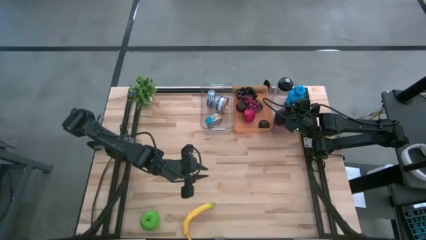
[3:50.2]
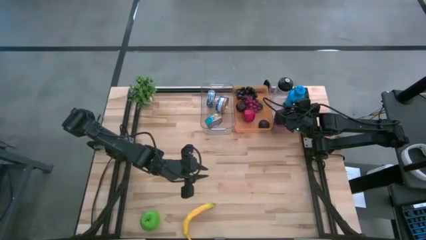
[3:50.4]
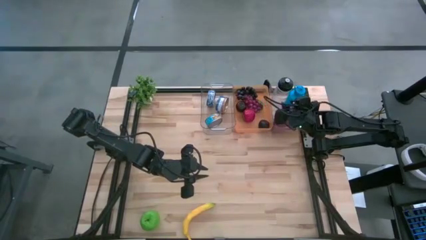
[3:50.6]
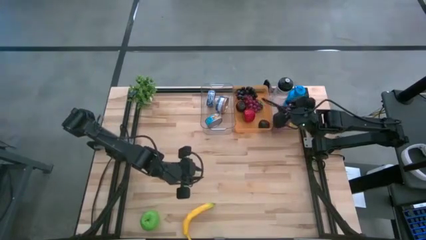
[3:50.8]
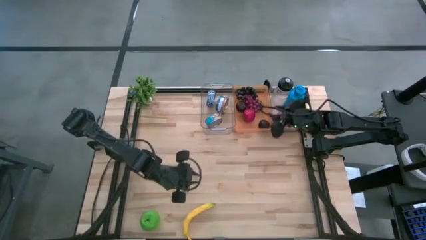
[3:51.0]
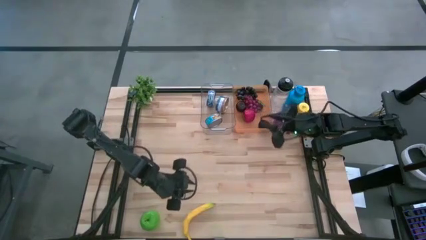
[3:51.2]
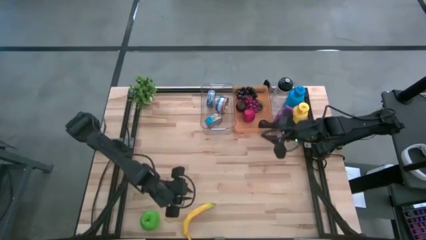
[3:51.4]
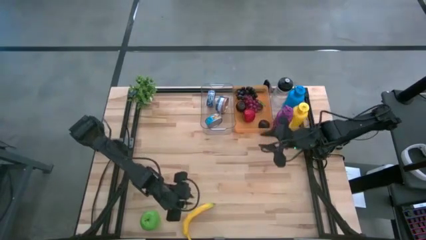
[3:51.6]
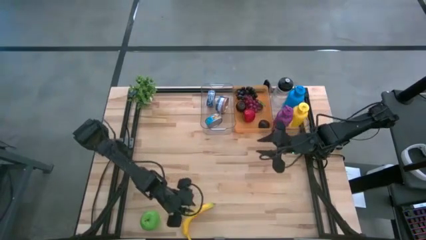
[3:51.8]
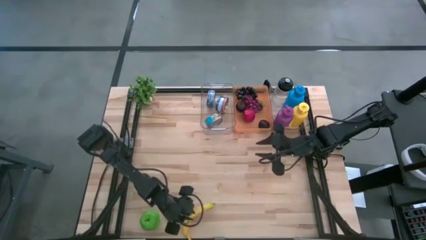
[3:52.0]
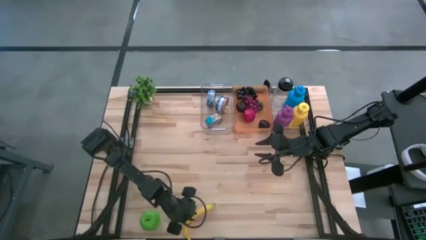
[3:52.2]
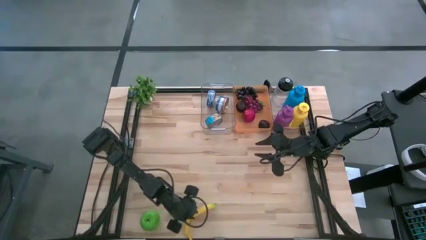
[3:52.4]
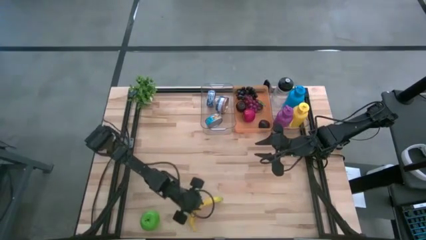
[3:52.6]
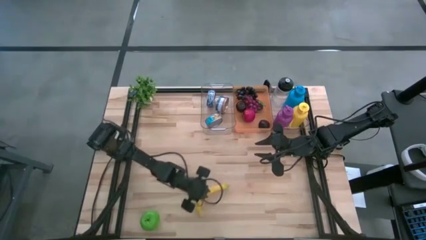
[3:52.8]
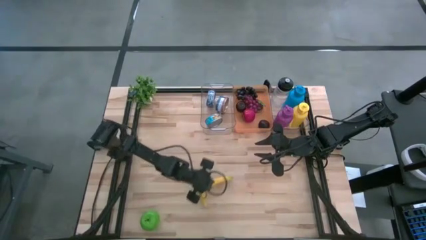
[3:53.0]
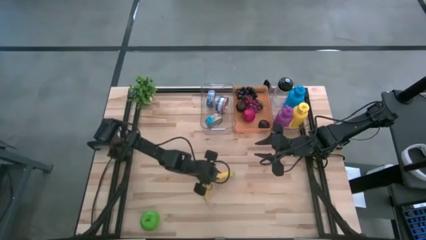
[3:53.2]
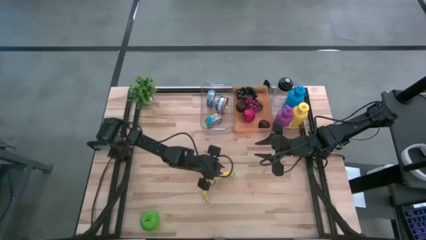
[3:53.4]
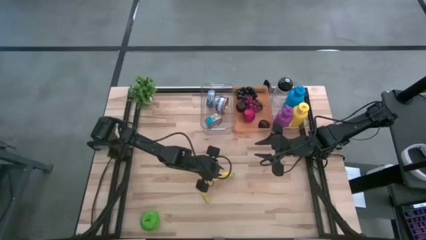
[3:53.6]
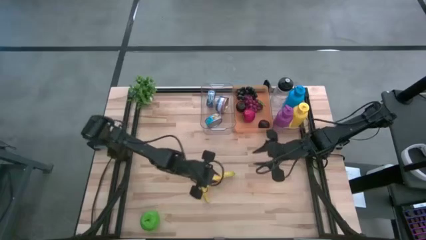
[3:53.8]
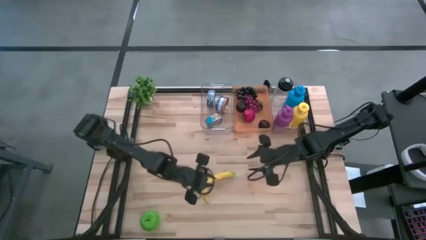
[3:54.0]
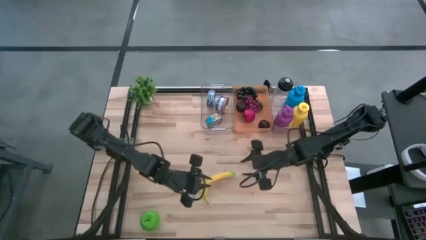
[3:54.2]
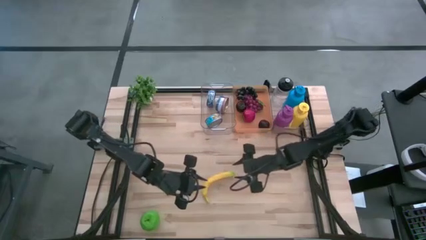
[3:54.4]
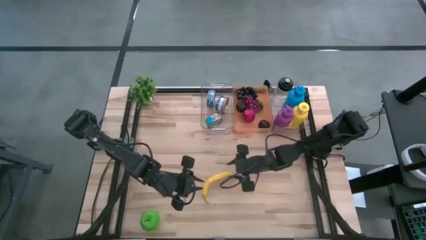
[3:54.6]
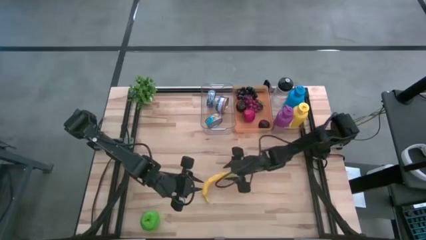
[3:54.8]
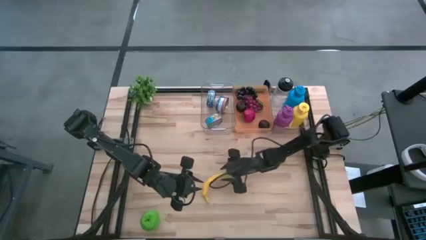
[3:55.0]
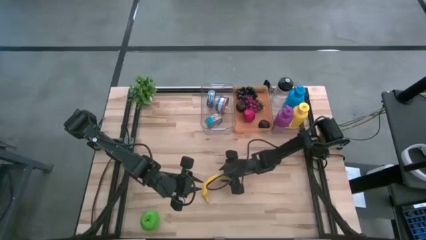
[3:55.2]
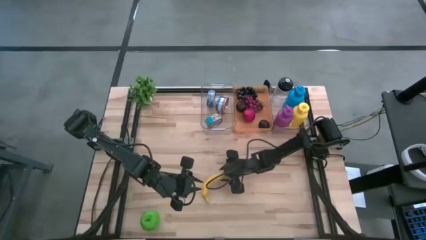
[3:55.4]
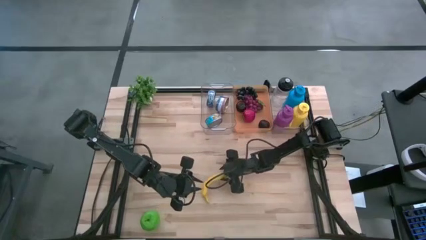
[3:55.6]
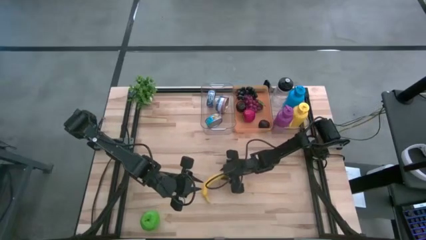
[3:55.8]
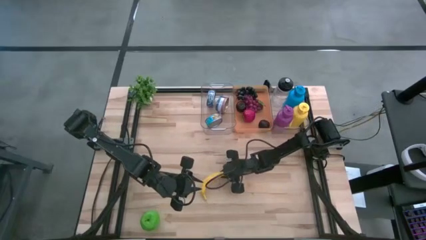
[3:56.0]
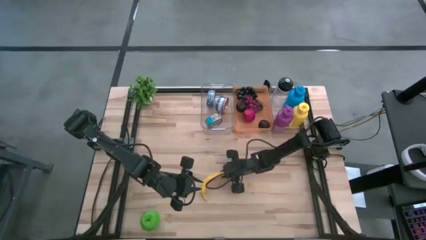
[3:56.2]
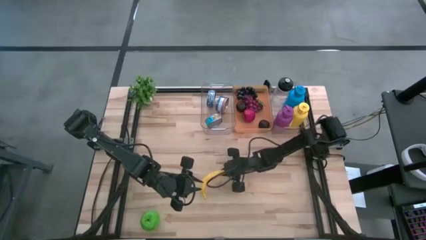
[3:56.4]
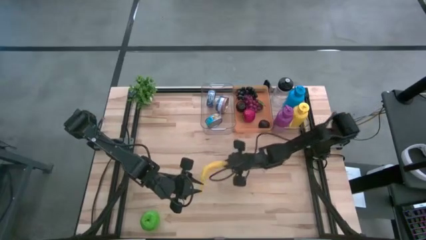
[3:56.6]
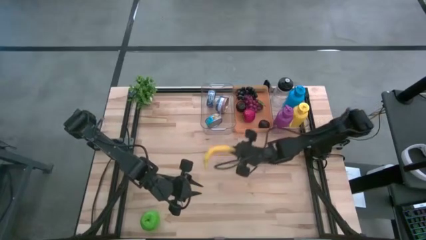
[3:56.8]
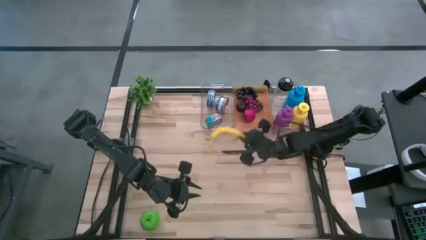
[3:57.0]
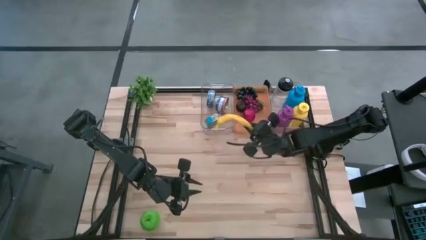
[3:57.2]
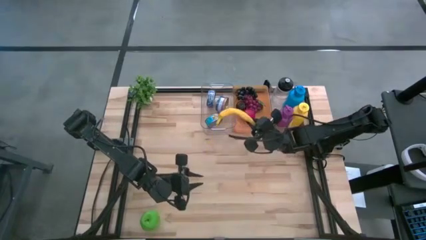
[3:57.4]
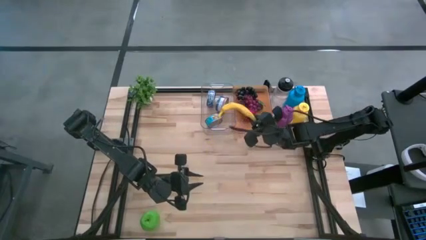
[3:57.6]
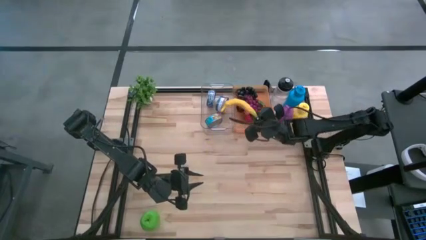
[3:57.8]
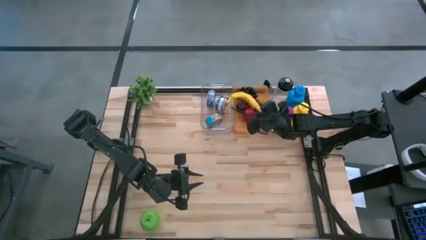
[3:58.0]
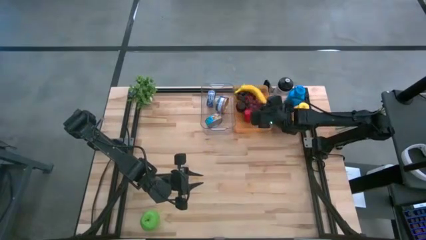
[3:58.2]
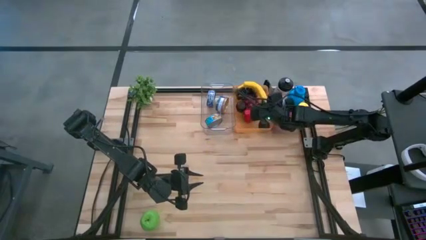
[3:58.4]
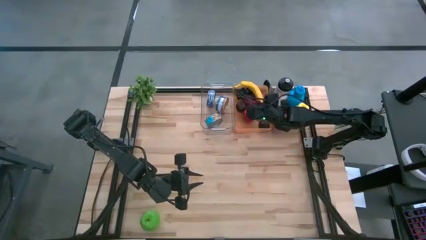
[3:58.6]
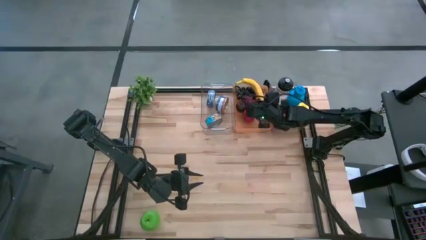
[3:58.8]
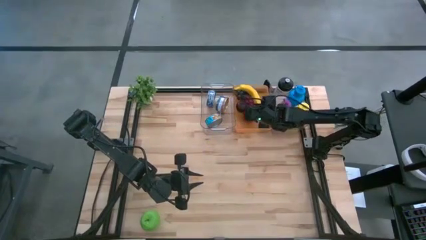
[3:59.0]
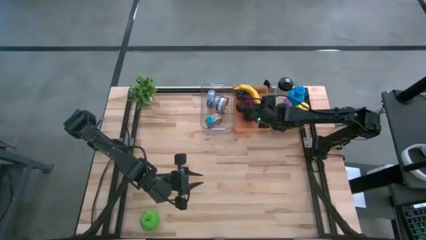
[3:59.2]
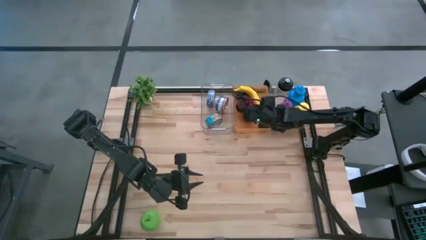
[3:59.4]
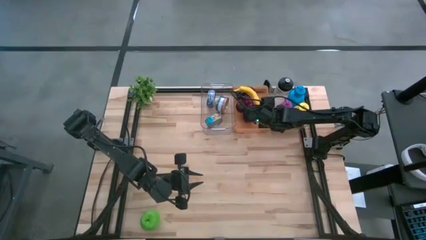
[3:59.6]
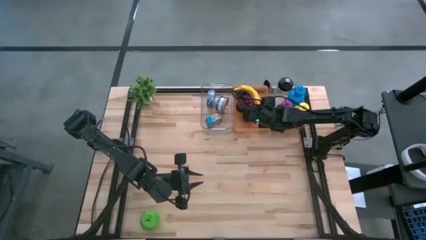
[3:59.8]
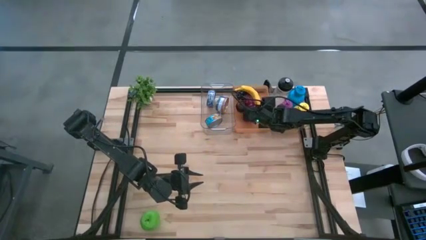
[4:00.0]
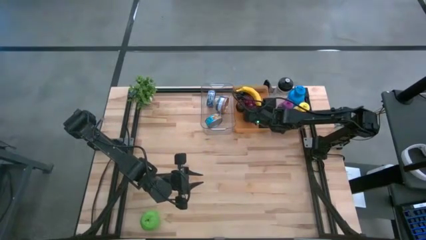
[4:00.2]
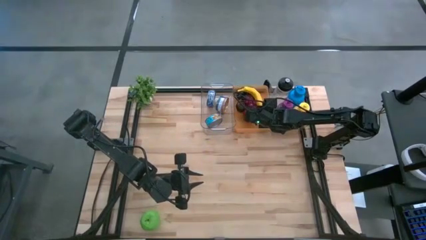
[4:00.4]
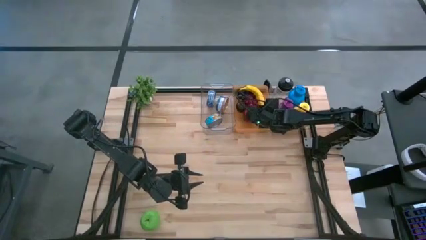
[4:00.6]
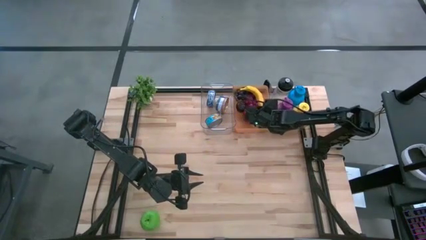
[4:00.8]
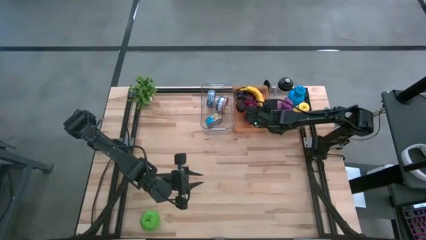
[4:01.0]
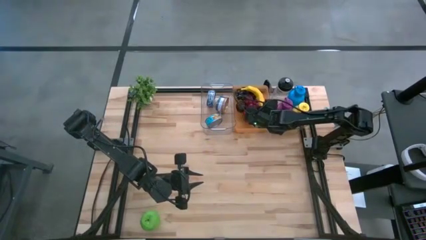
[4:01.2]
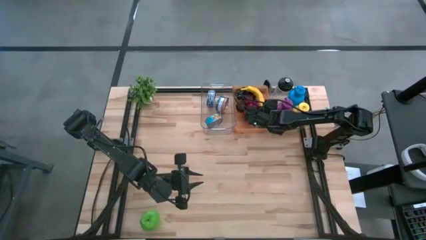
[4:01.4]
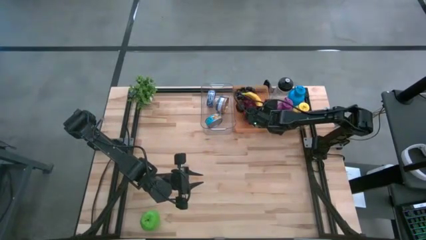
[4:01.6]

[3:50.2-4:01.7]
Task: Pick & Place Food Item
Put the yellow banana into the orange bin

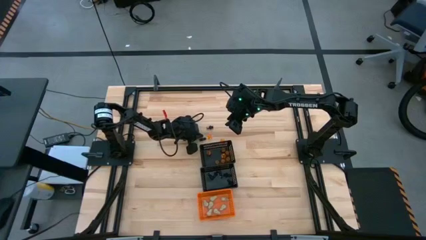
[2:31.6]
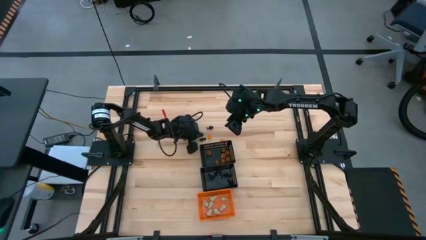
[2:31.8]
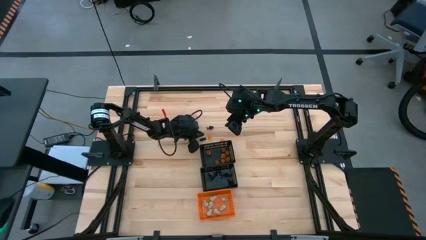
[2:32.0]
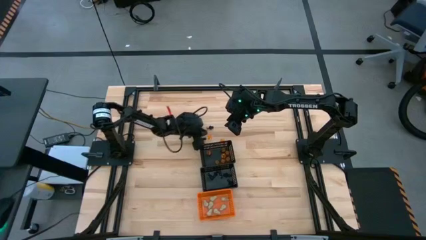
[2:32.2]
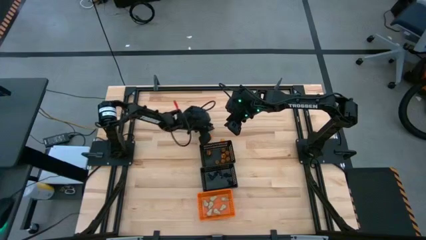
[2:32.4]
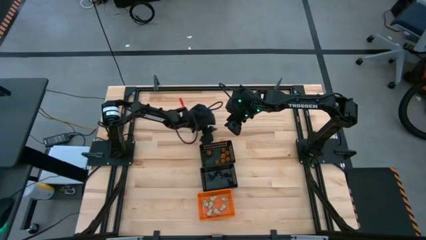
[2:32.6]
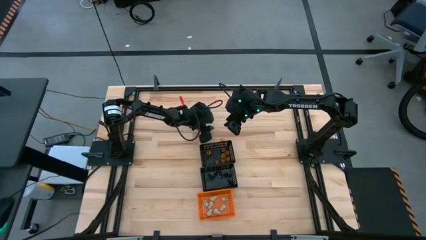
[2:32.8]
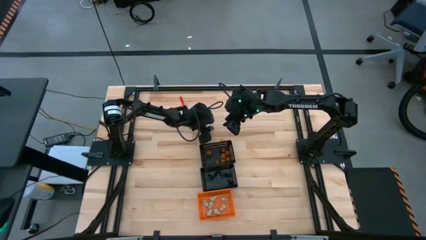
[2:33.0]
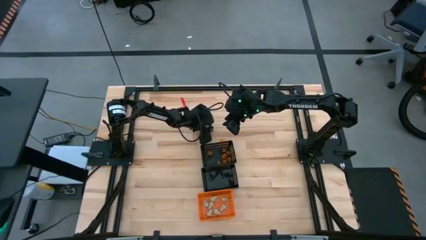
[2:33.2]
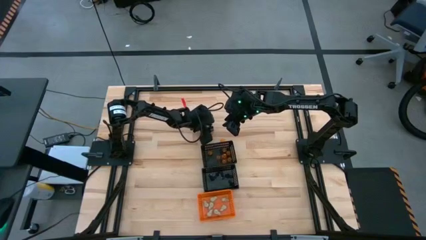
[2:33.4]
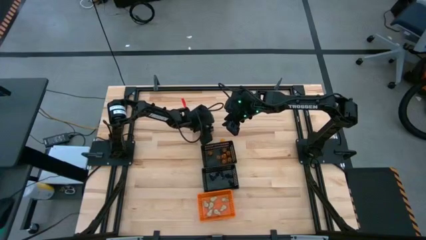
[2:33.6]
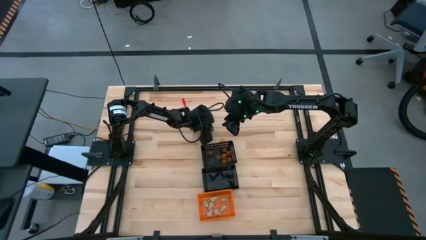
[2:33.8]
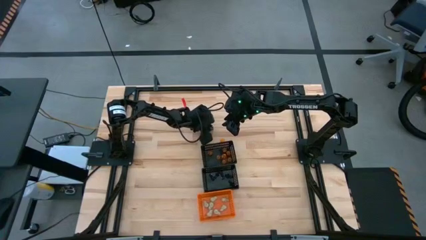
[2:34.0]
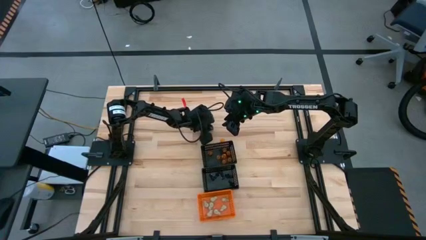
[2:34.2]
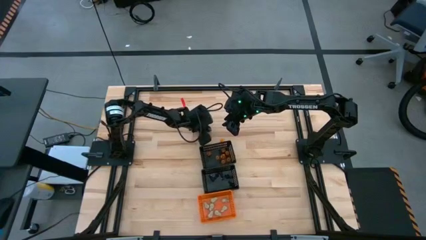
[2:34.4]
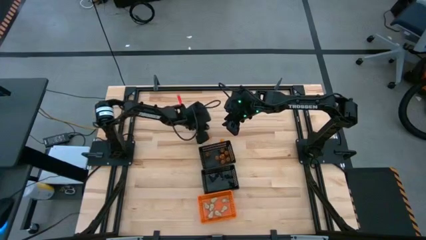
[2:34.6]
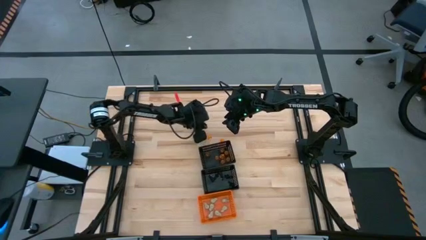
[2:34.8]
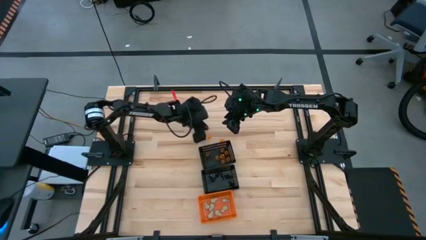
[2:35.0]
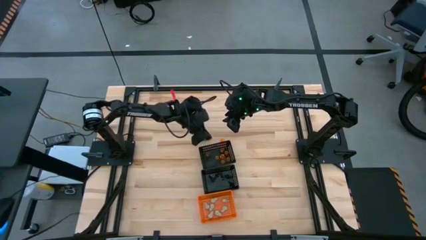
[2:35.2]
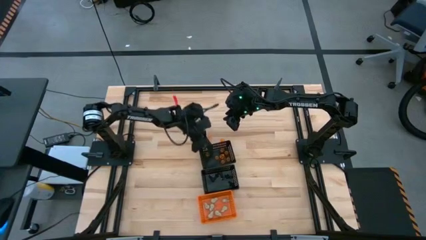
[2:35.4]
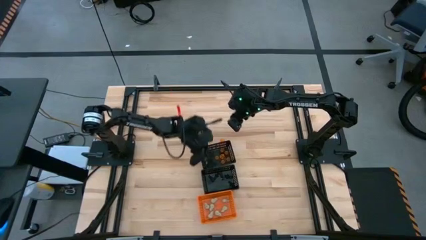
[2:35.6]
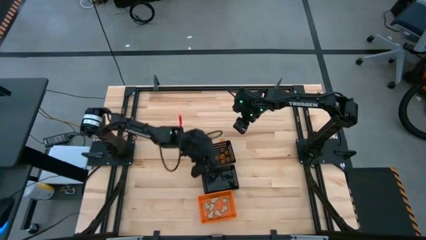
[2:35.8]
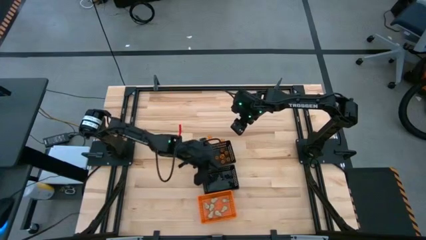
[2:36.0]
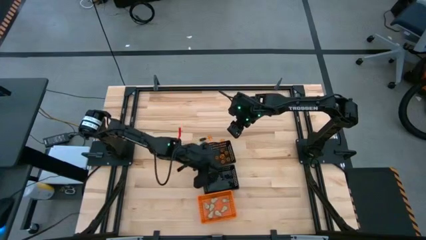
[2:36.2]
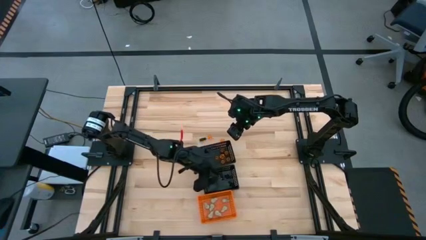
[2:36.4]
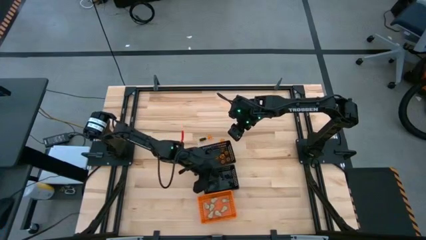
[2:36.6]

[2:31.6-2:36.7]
Task: Sort Halloween decoration
Put the black skeleton toy into the bottom black bin
